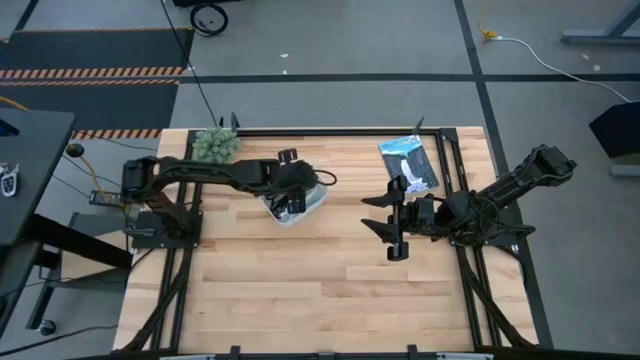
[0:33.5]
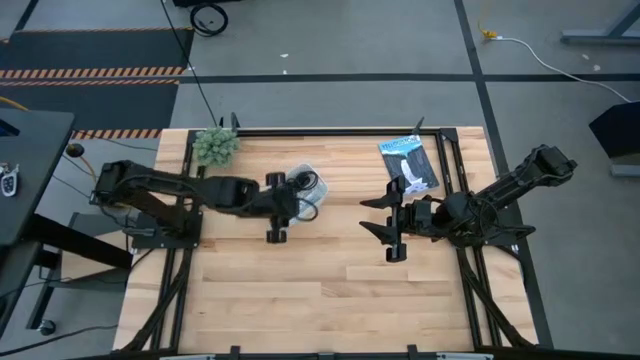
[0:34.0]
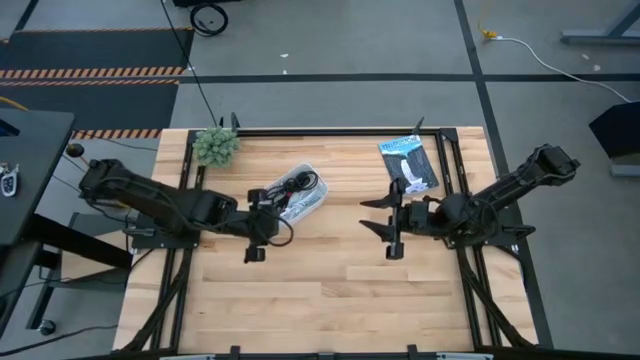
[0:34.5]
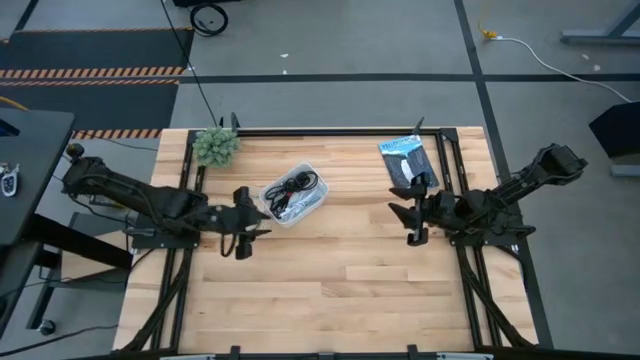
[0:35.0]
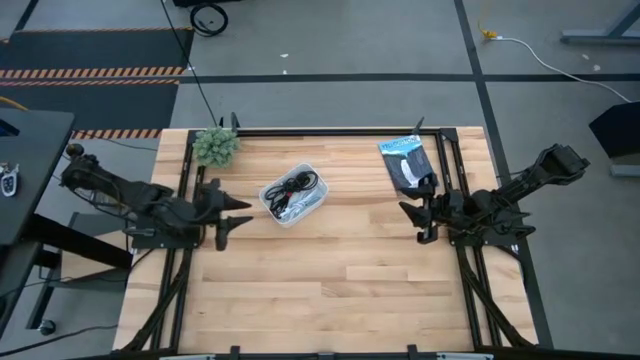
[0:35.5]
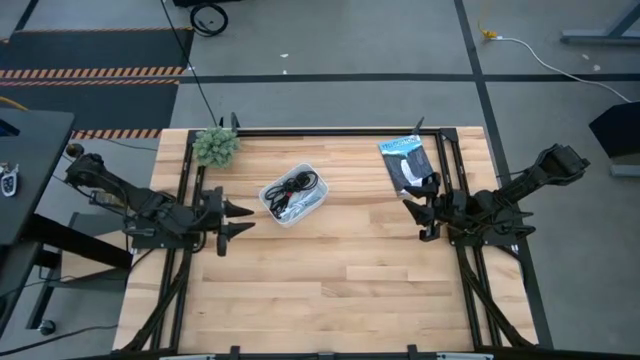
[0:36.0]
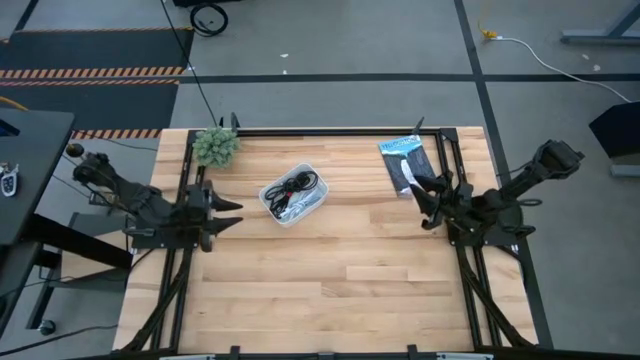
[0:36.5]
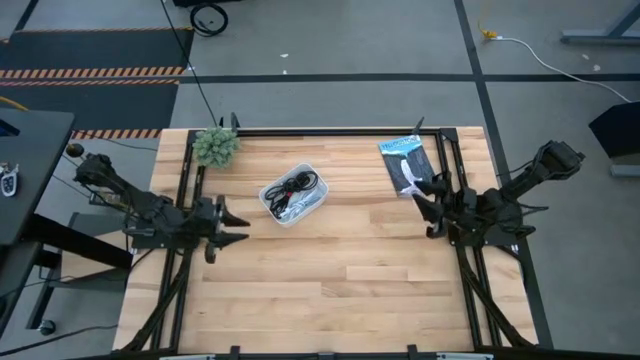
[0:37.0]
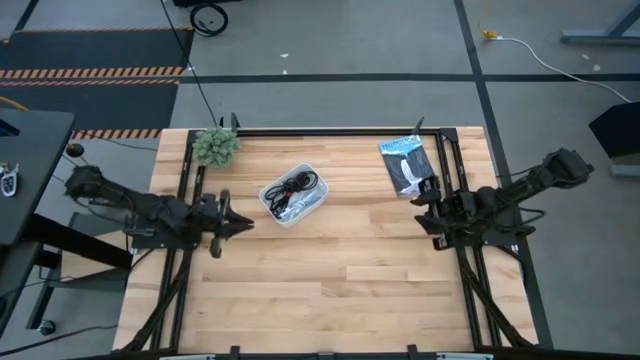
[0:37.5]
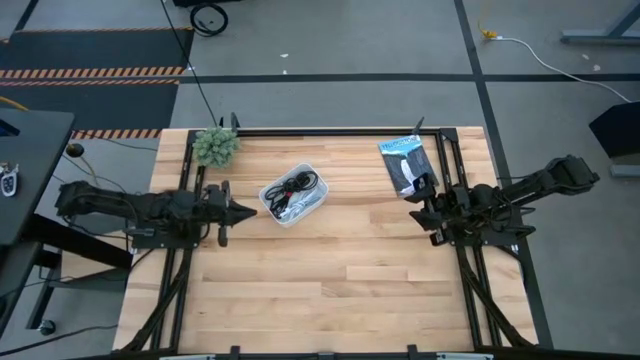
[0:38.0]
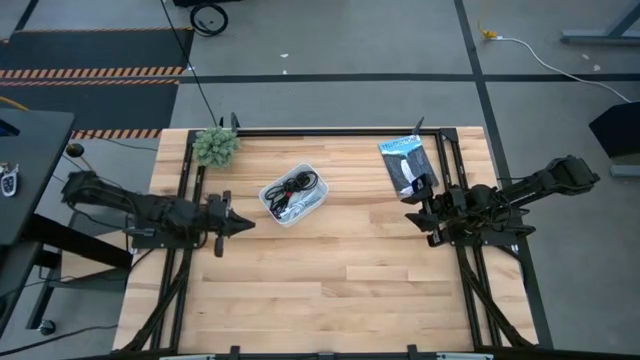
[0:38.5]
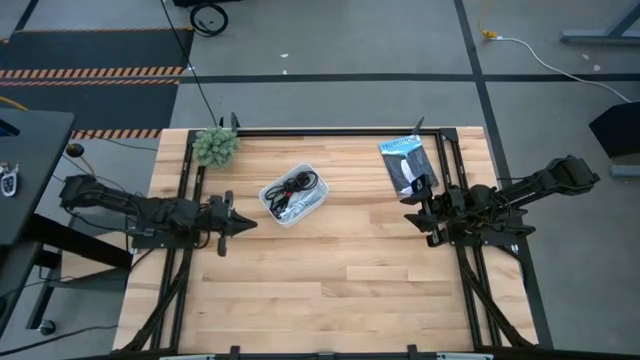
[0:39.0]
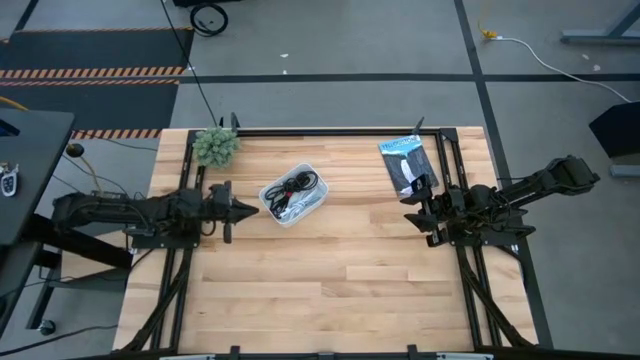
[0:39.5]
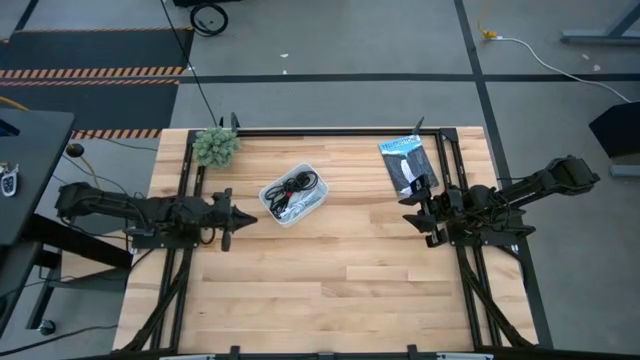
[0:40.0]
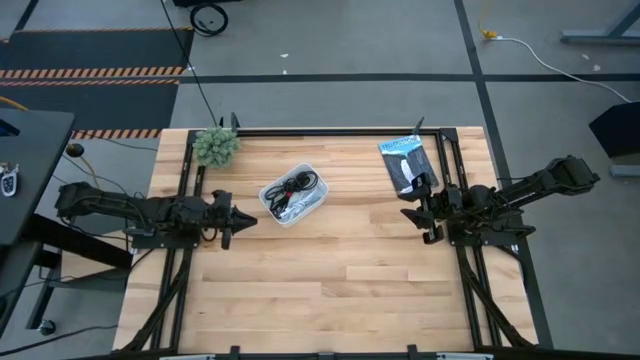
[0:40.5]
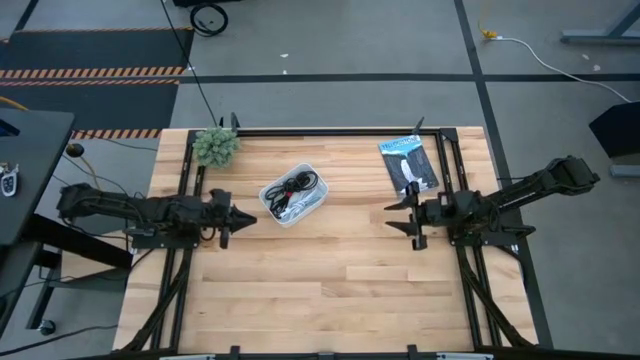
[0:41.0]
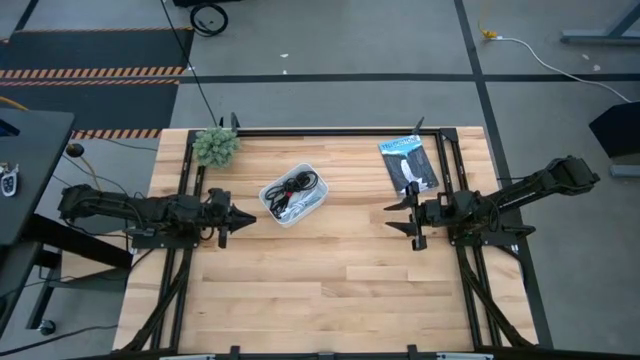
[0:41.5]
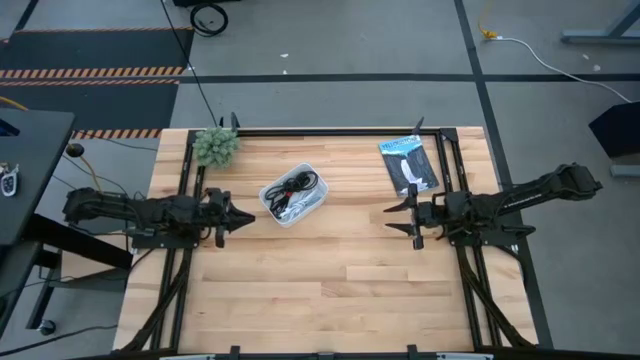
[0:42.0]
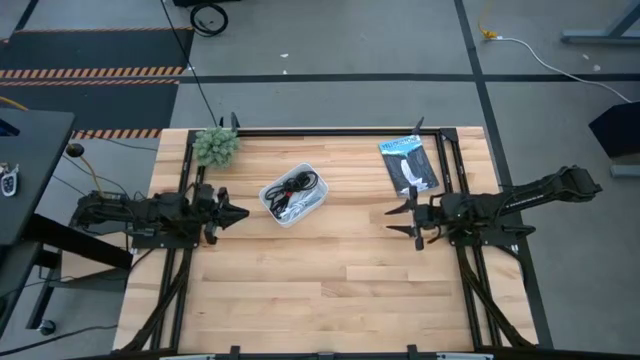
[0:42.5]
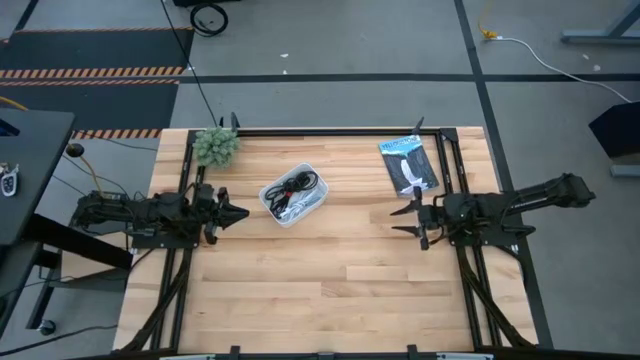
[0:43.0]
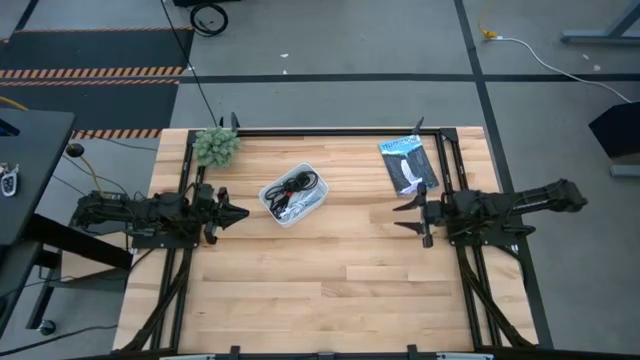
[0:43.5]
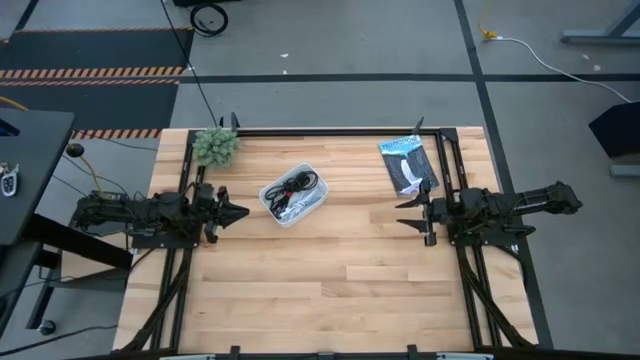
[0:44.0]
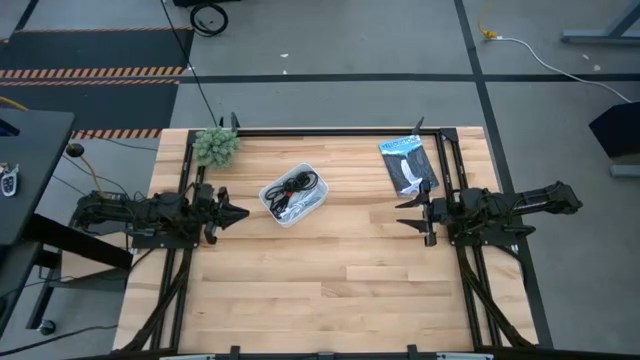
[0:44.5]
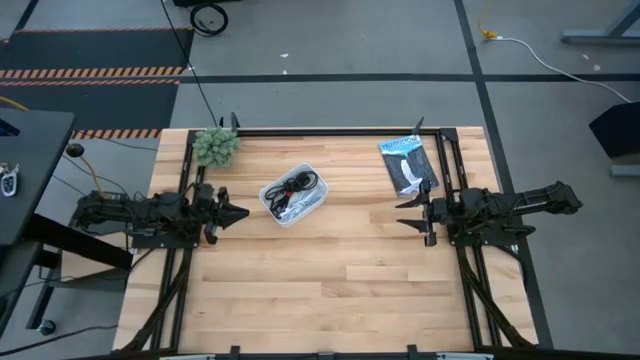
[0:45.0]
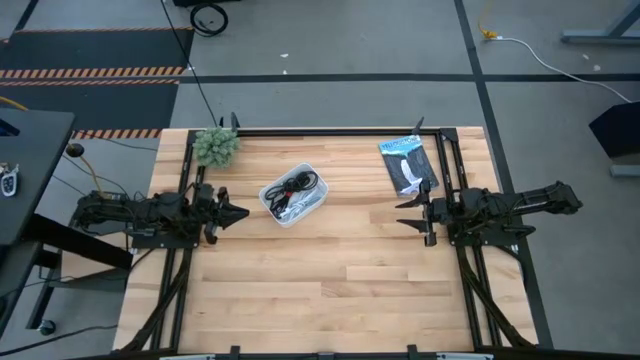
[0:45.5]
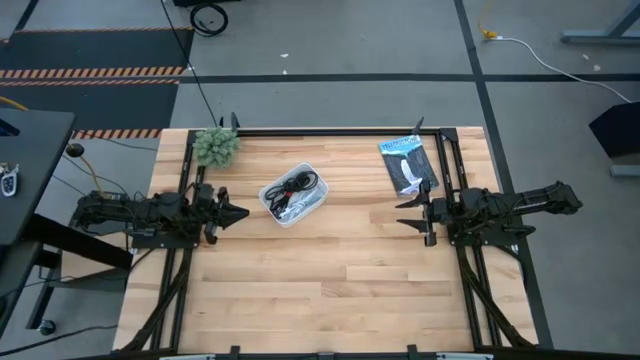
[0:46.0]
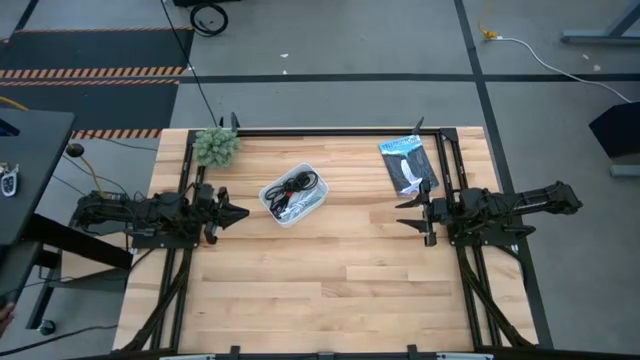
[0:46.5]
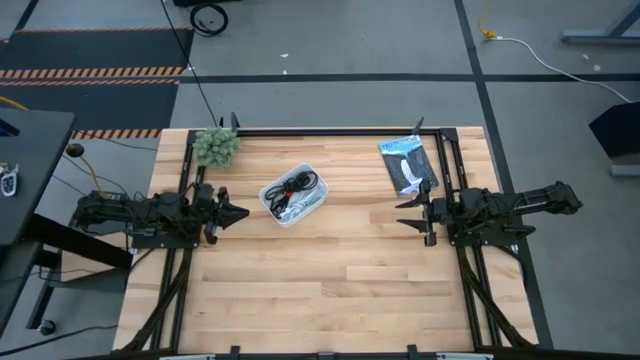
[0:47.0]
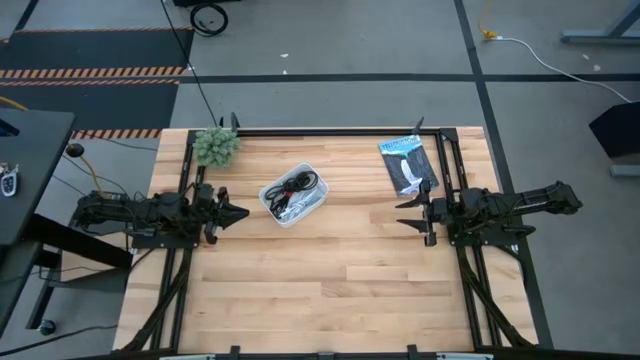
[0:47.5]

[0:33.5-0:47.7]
Task: Pick and place USB-C Cables
Return to home position

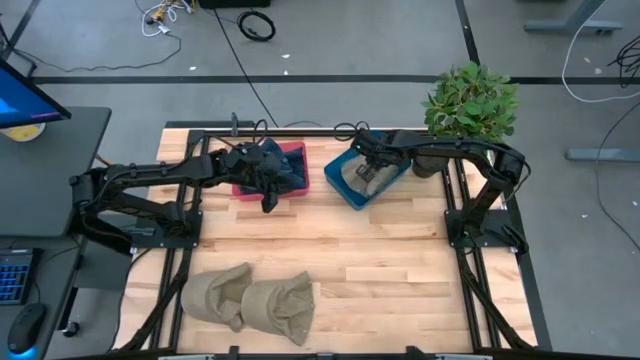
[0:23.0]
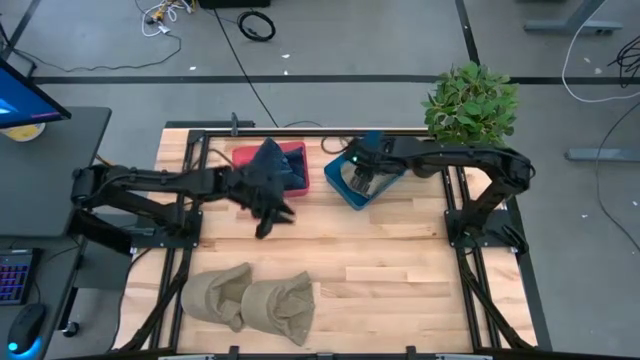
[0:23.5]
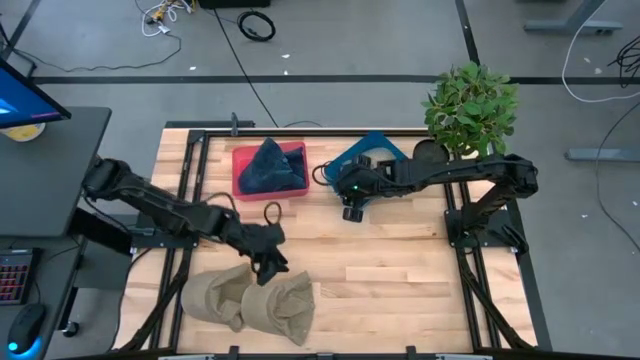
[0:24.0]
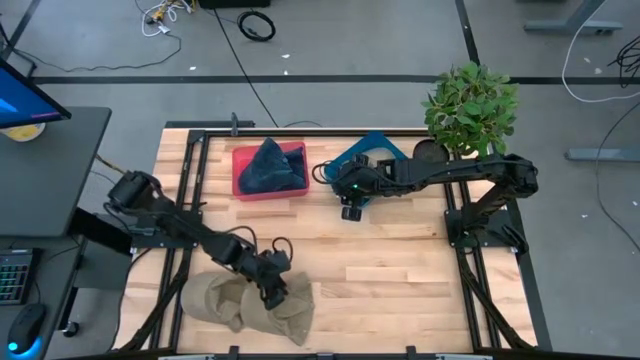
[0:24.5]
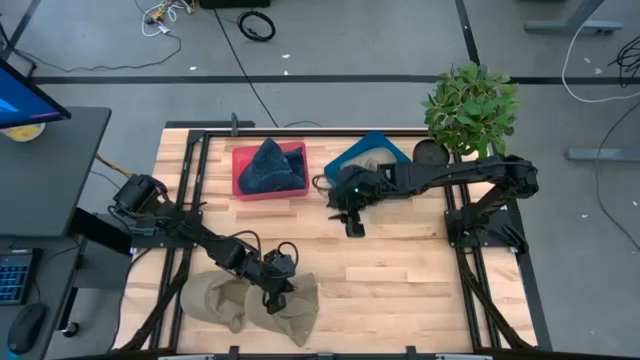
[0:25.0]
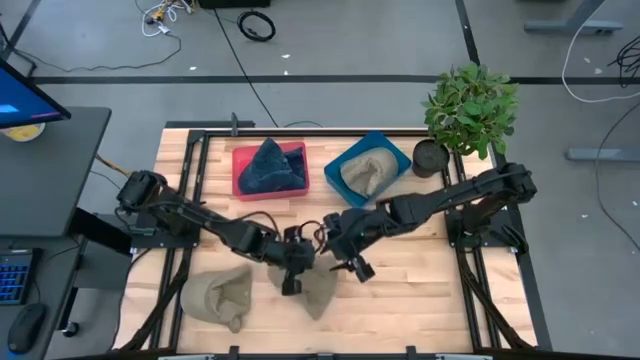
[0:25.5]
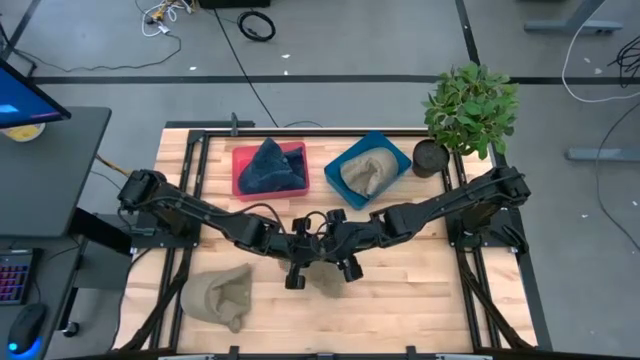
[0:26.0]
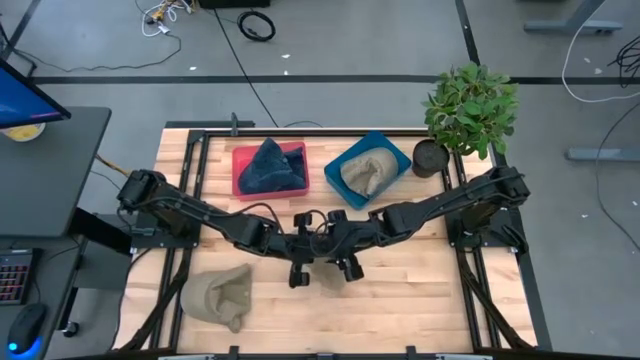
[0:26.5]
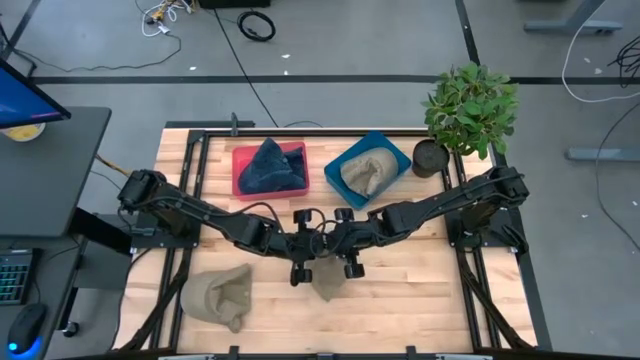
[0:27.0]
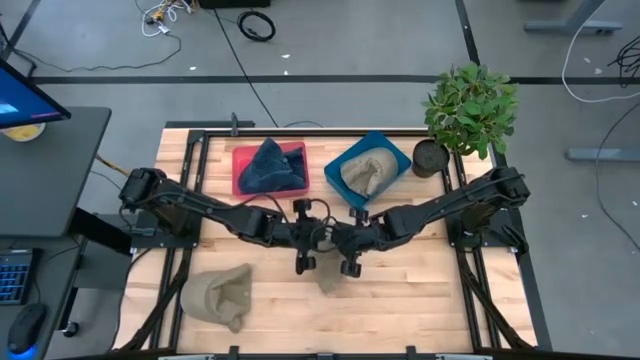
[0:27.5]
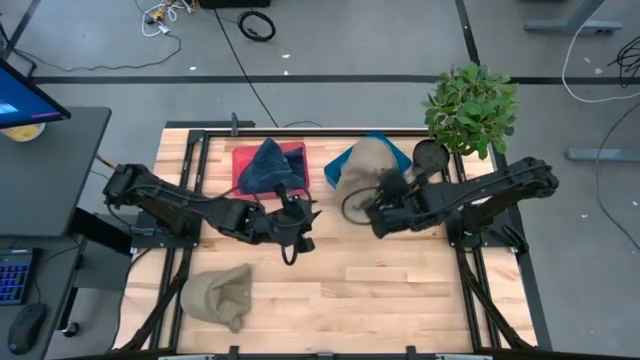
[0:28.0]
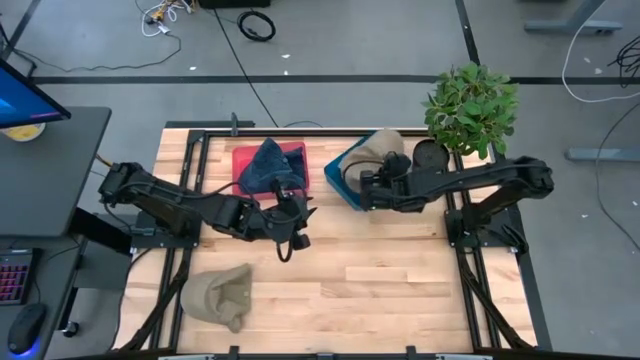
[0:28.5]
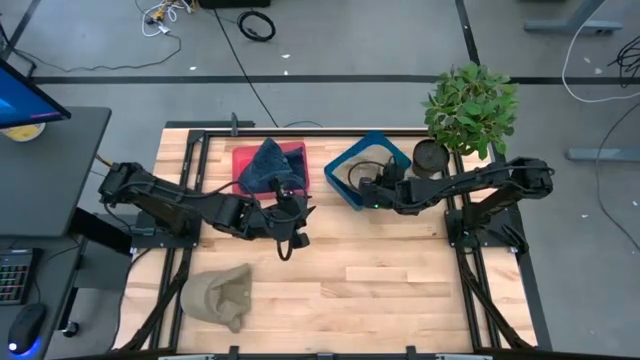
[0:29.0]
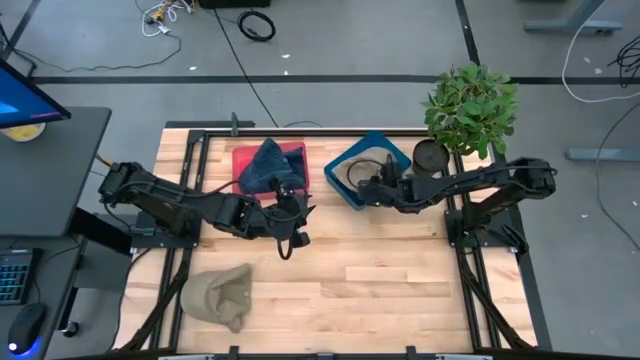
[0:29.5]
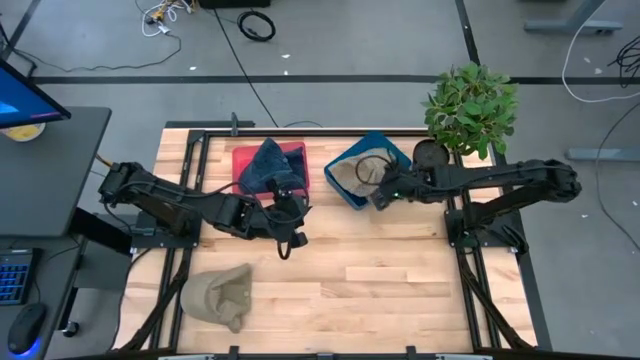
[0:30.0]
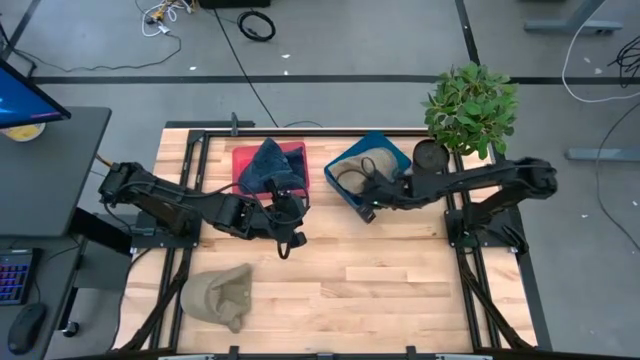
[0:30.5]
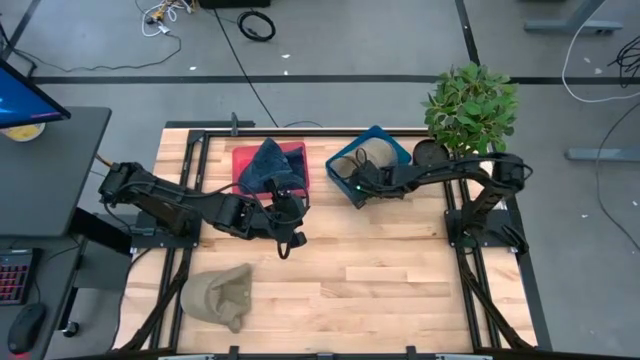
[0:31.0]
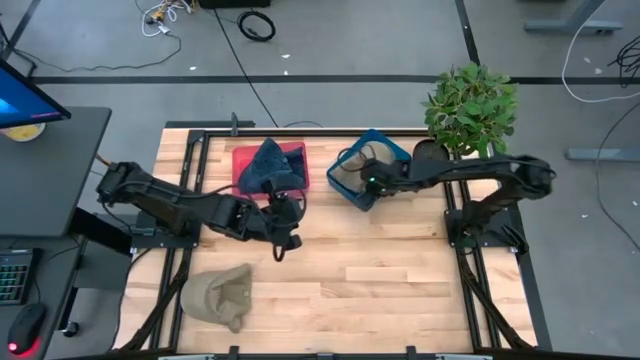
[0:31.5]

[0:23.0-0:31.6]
Task: Pick & Place hat
Put the right gray cap into the blue bin
